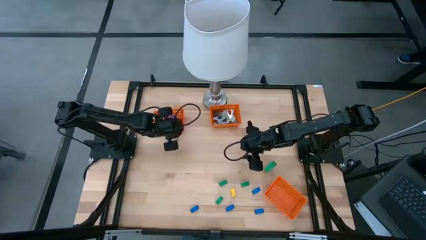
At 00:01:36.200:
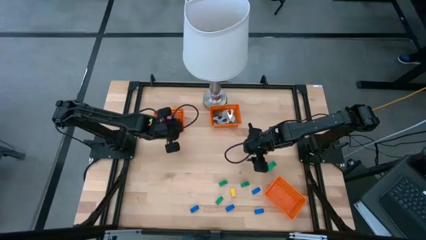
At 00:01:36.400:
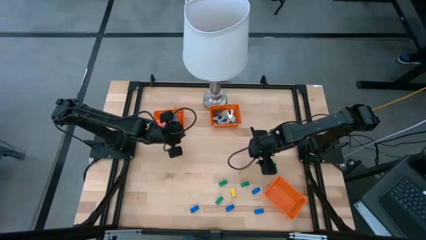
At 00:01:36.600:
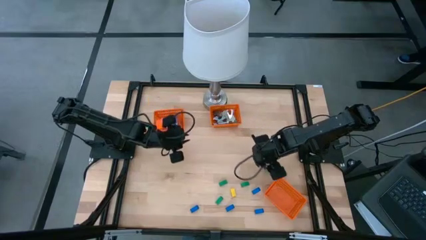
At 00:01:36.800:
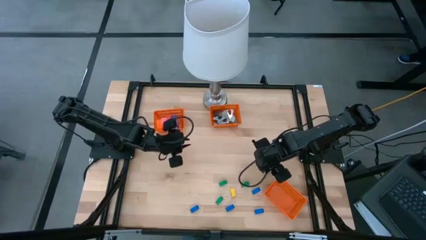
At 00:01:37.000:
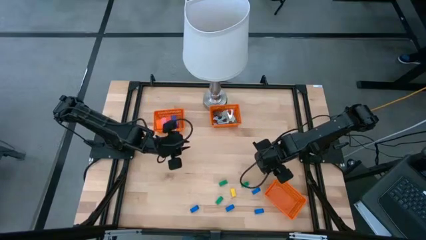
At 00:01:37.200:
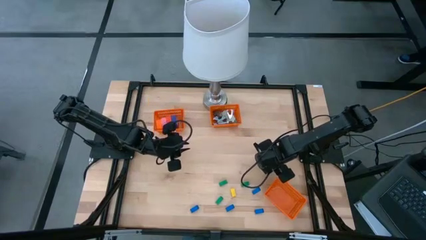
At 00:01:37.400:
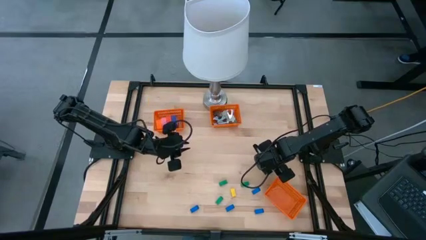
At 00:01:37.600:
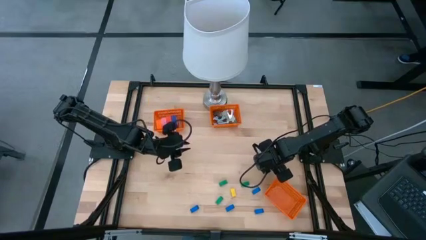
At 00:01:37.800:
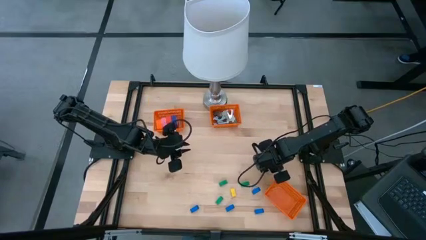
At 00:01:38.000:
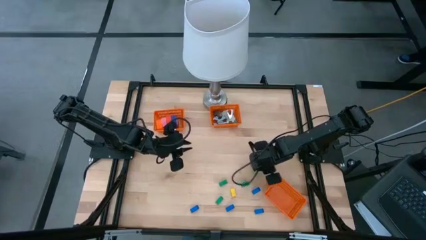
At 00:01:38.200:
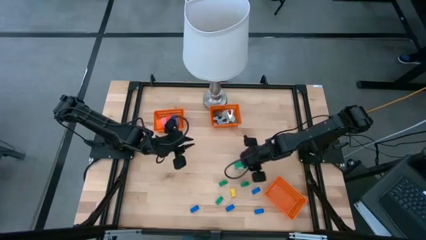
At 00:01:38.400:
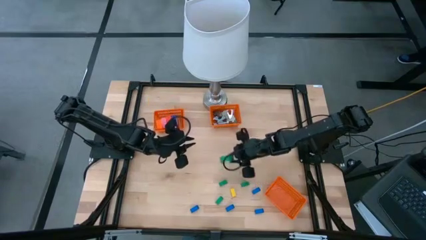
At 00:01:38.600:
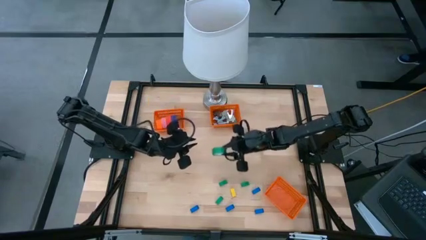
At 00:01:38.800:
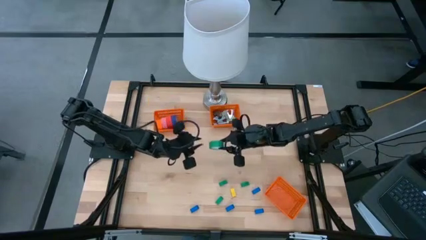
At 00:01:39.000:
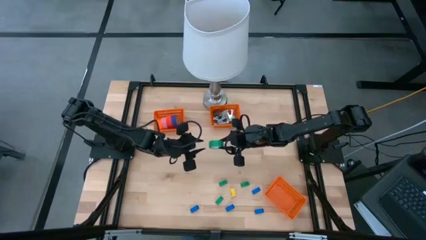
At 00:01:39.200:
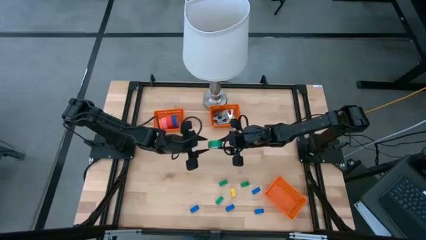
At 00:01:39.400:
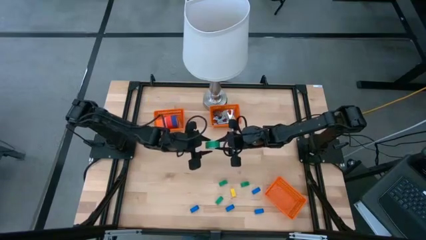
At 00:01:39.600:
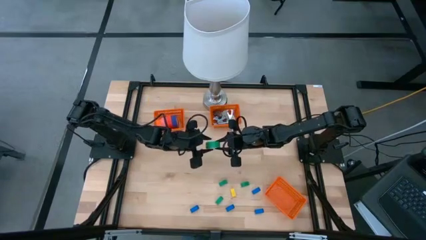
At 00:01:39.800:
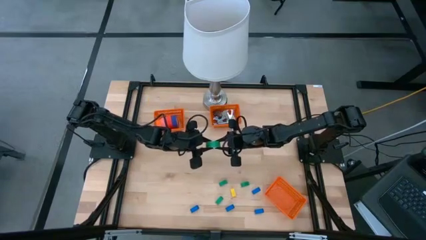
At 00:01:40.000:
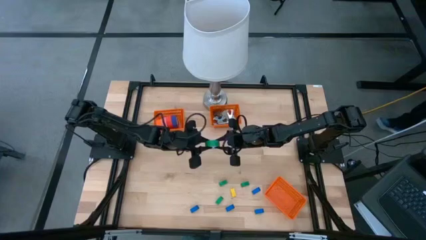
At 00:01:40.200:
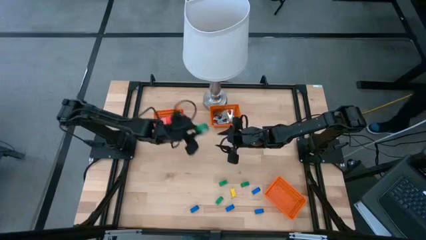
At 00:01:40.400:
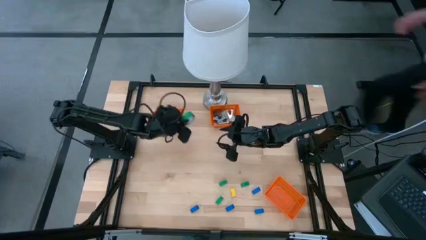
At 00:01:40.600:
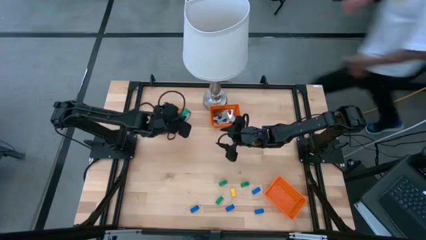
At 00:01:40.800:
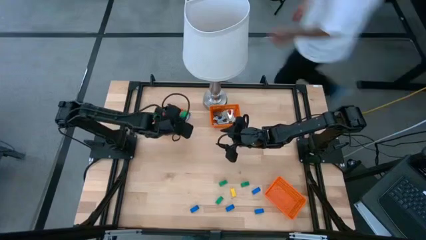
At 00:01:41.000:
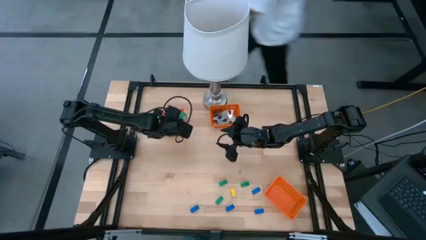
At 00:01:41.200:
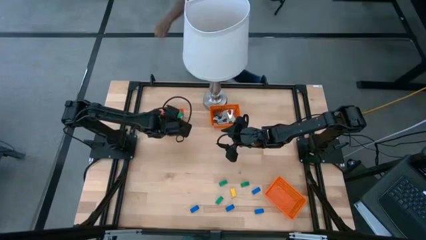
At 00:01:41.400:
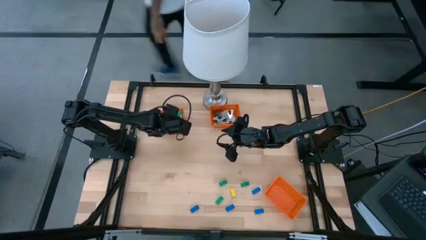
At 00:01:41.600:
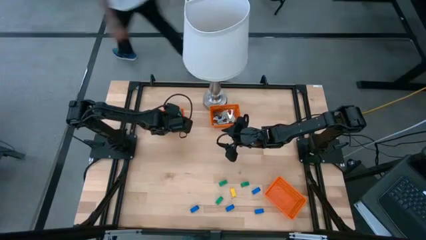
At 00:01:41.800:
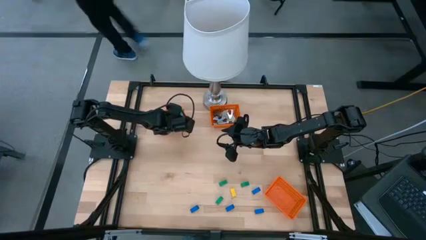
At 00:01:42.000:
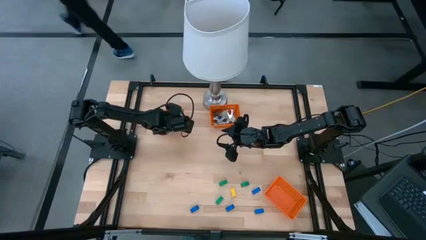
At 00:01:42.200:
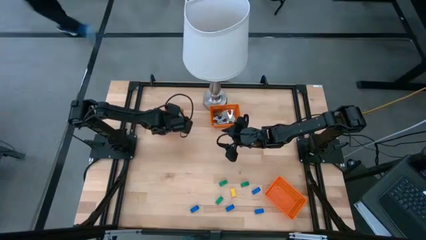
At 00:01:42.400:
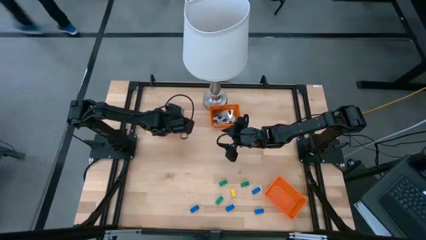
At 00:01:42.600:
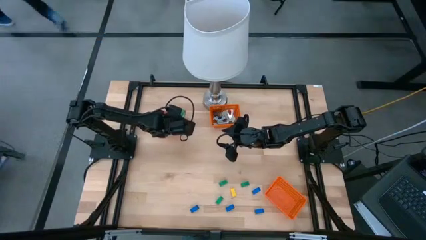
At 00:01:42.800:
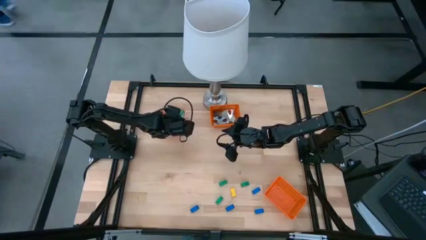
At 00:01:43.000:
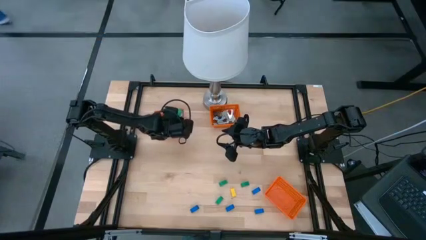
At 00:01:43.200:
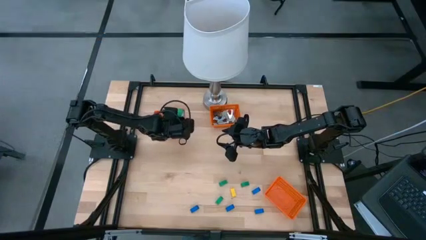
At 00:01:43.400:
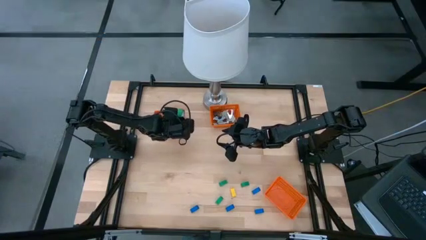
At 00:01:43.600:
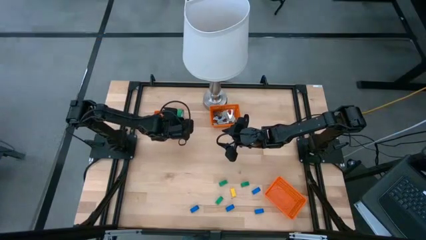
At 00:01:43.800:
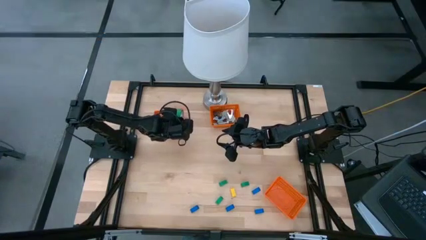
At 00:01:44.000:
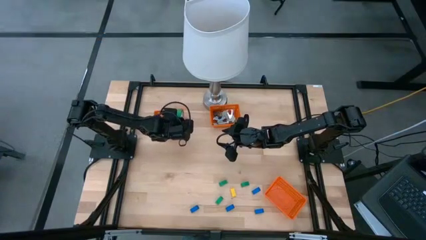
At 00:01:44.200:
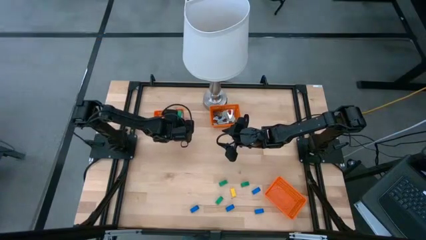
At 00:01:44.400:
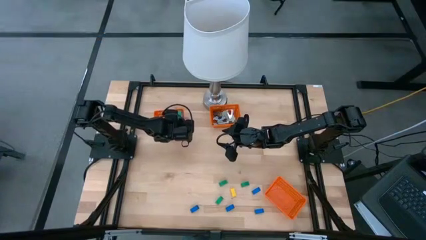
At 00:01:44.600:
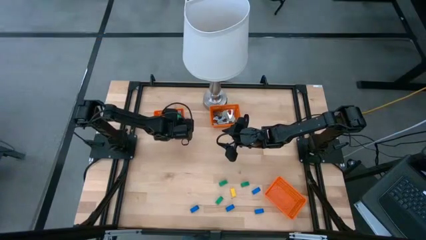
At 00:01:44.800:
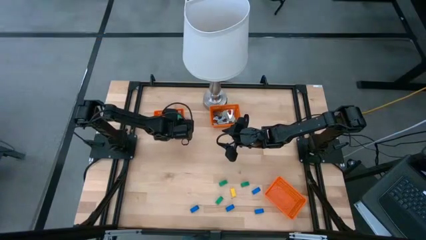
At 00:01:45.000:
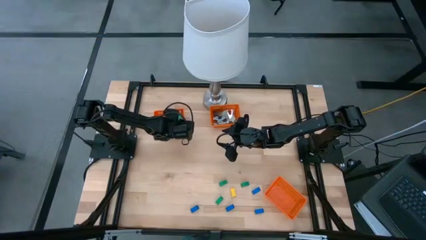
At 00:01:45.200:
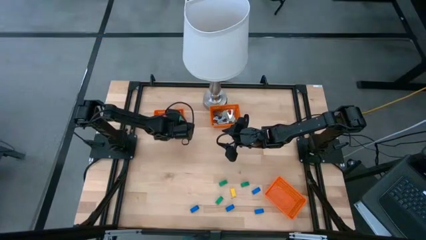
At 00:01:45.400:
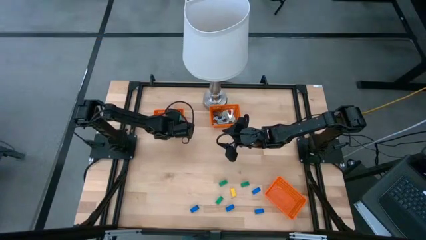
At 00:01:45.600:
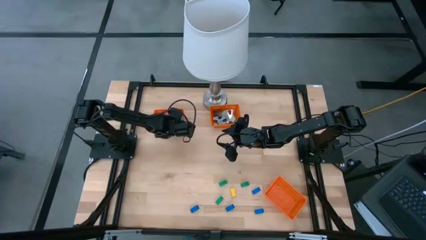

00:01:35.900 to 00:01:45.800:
Task: Pick and place Stapler, Stapler remover, tape
Put the green tape into the top left orange bin

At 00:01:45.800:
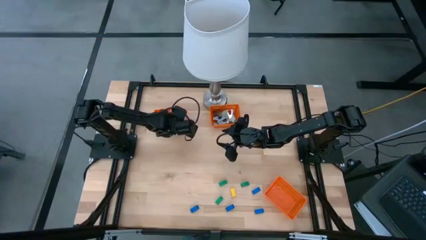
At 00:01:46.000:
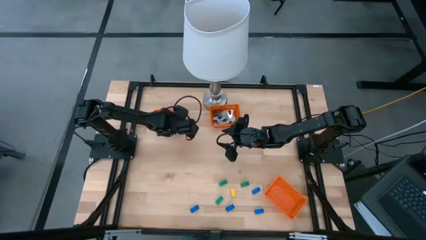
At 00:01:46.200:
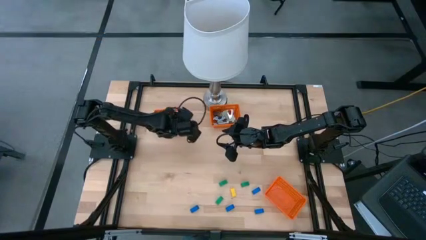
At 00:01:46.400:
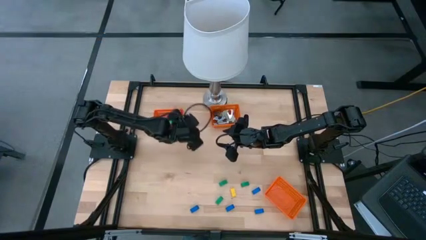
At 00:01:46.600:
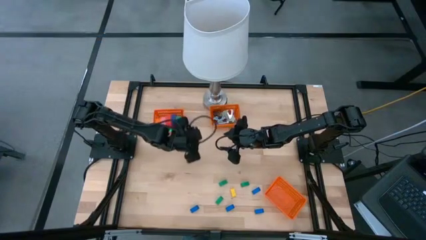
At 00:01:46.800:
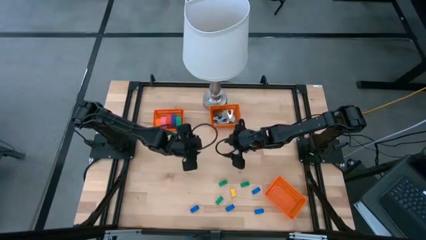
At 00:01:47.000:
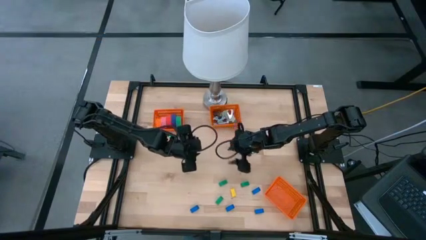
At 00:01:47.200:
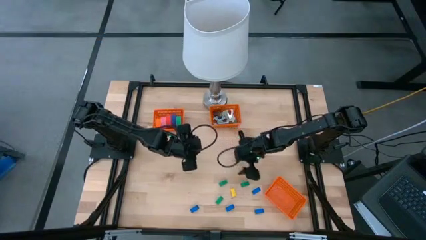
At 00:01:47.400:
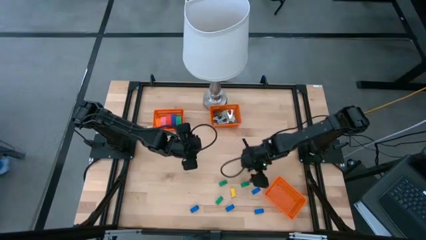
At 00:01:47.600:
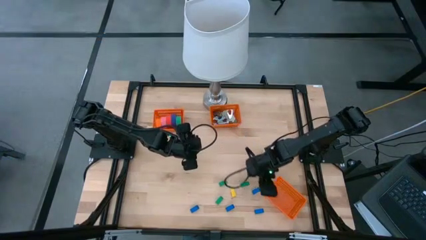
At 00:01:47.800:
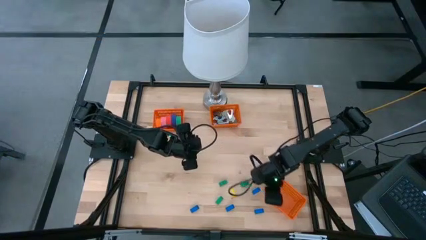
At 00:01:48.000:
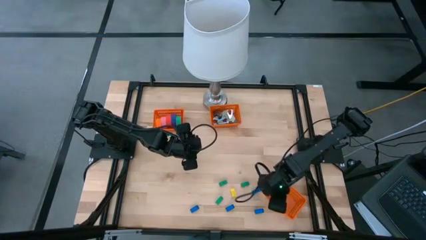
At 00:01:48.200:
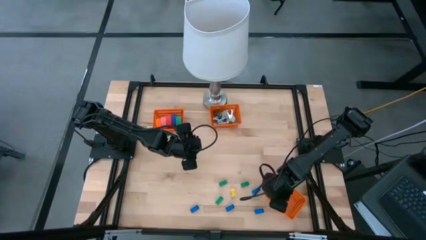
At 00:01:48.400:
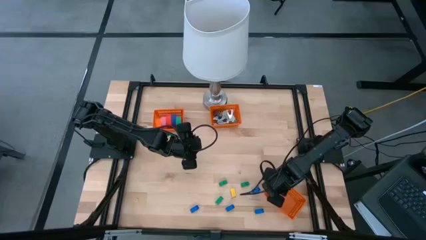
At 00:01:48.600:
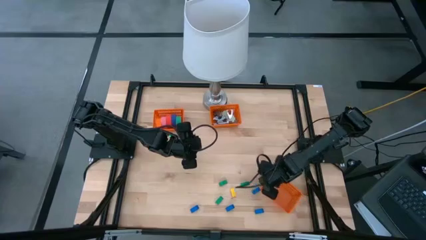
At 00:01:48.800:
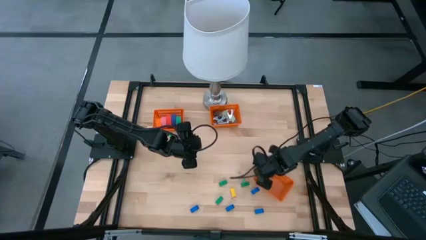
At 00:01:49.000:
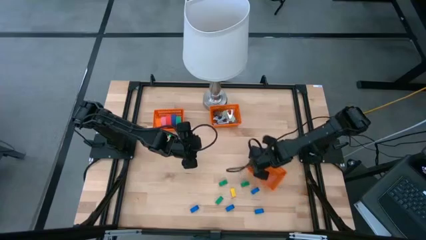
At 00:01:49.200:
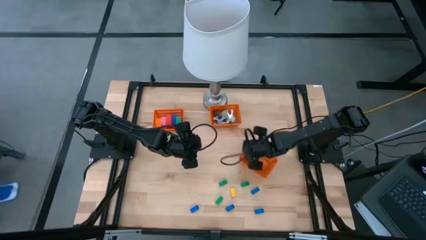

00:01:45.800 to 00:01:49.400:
Move the orange bin to the middle right of the table
